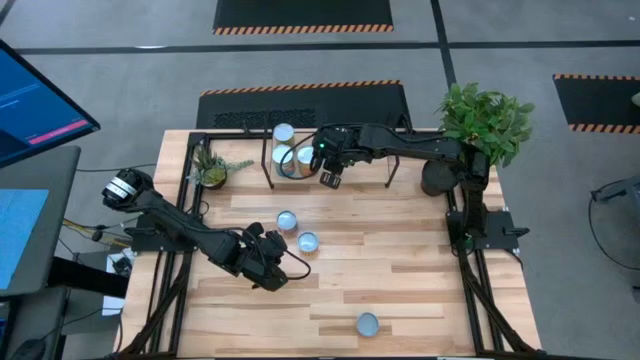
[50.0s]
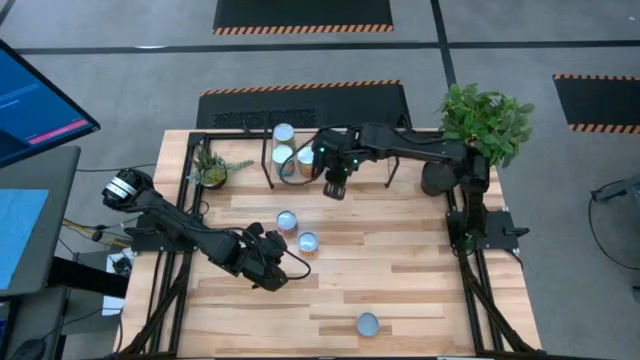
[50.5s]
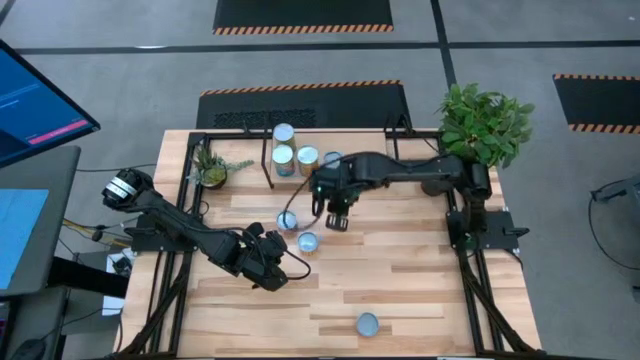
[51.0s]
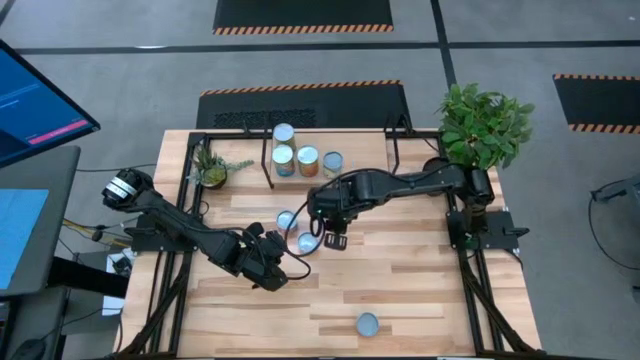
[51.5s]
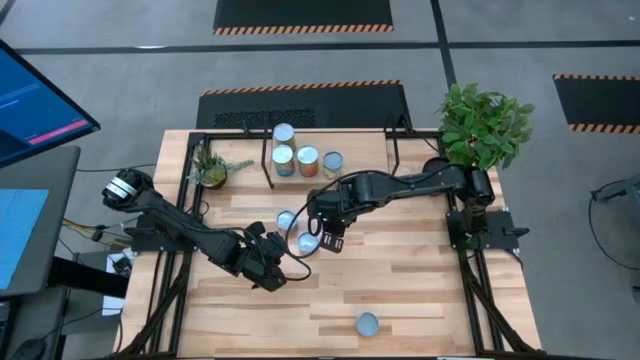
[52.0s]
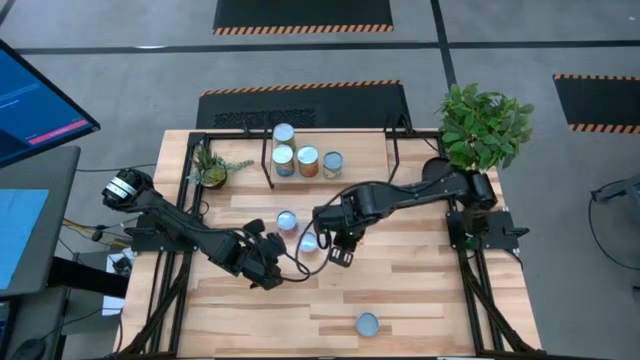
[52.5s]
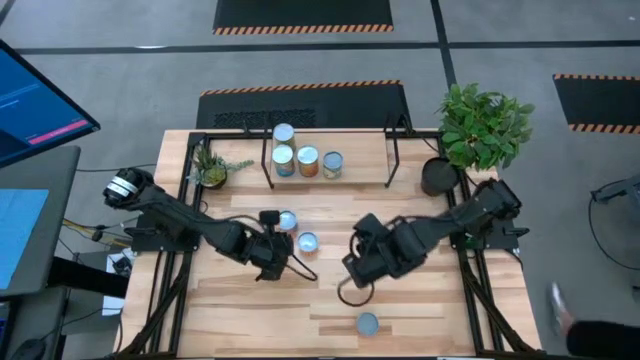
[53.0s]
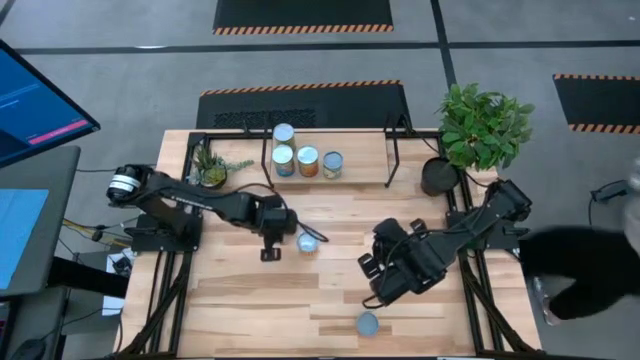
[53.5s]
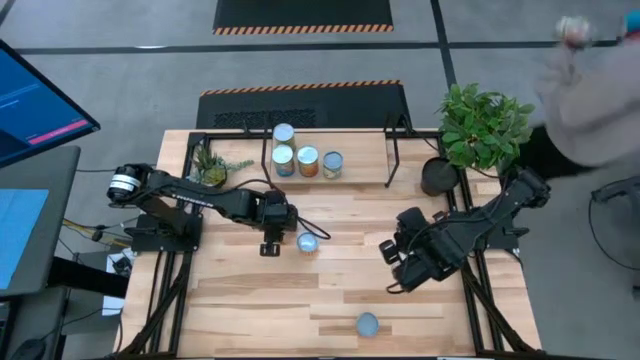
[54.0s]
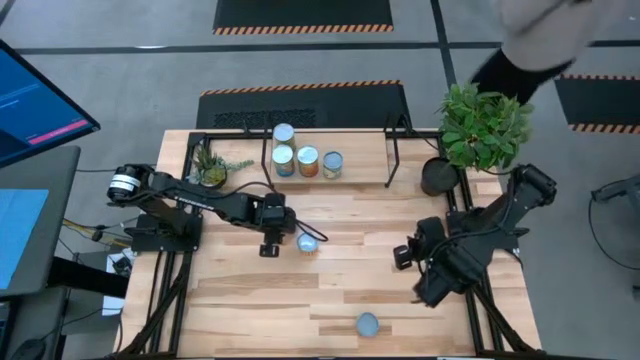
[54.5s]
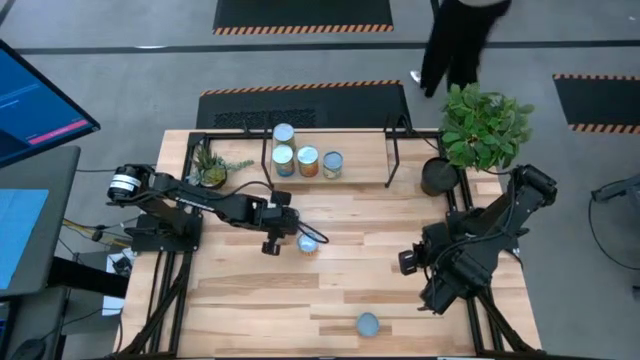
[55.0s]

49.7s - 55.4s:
Task: Pick and place cans onto a shelf
Put the canned corn on the shelf

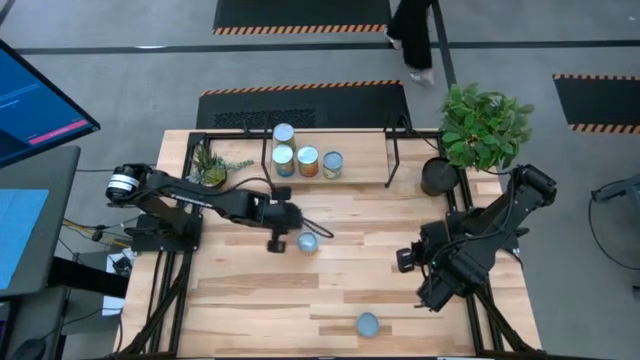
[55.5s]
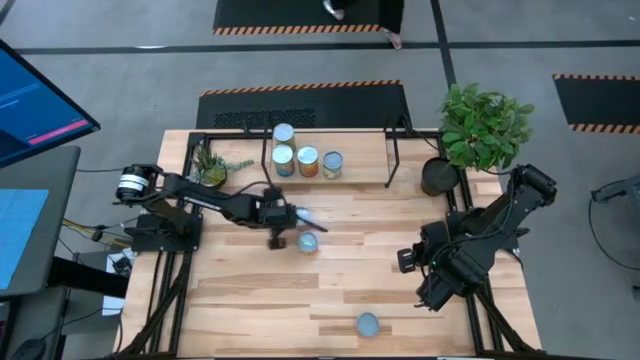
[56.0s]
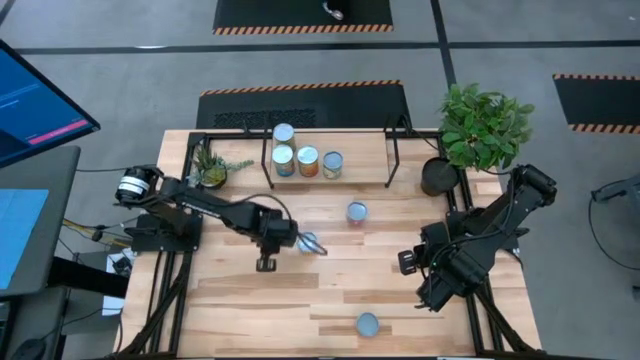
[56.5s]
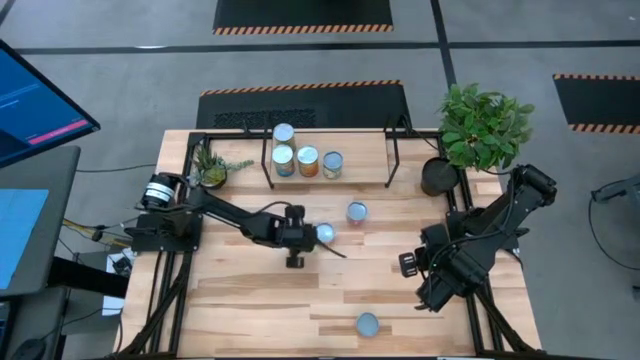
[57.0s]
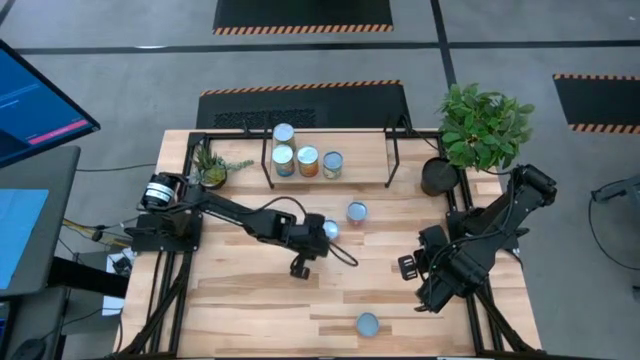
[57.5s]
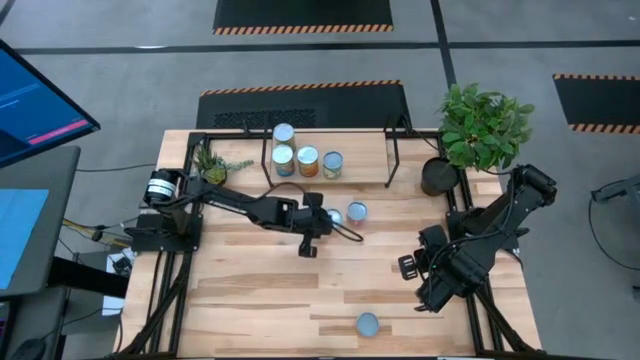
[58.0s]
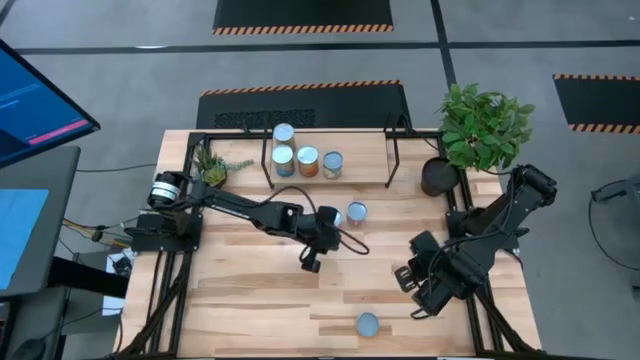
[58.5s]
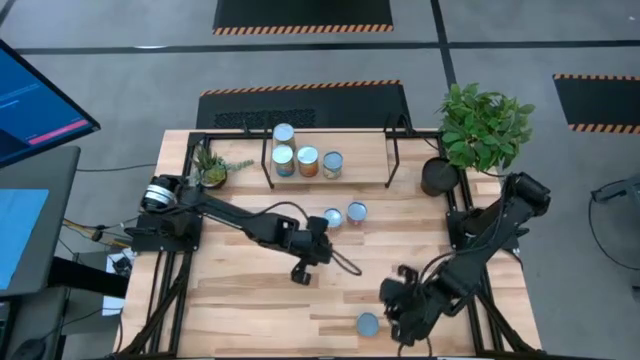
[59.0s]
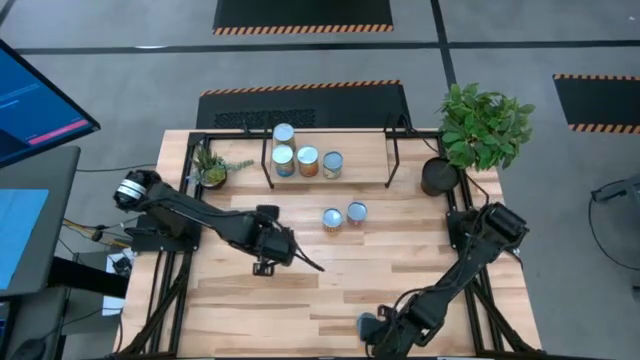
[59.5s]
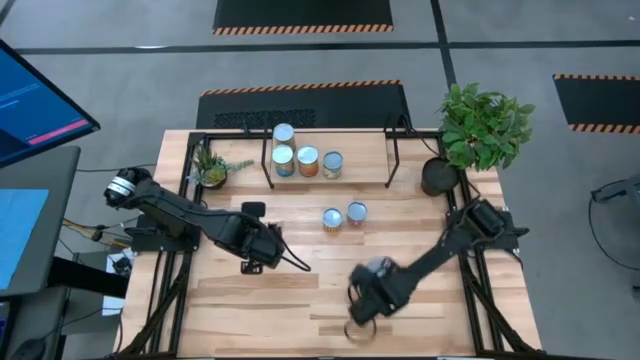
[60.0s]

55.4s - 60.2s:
Adjust the canned goods

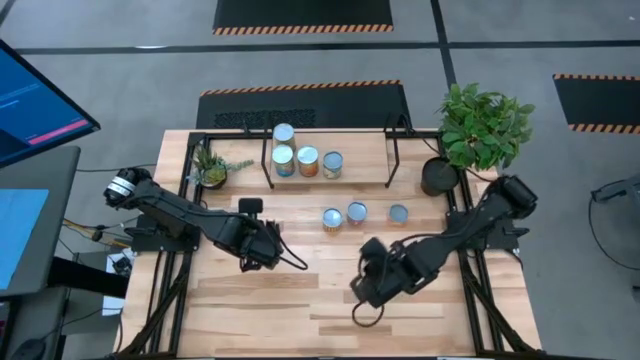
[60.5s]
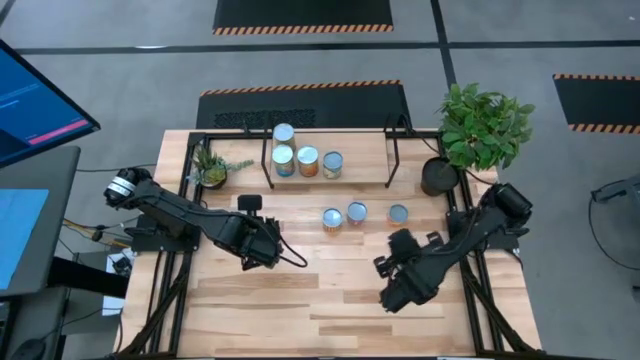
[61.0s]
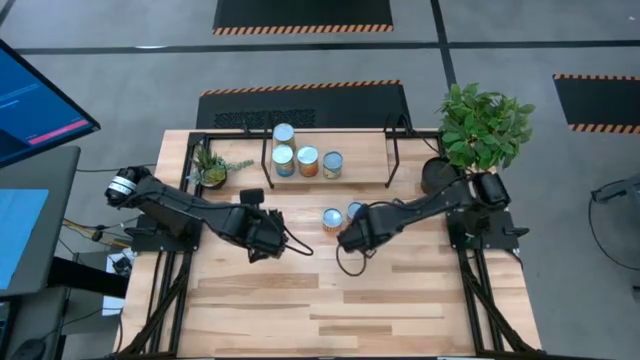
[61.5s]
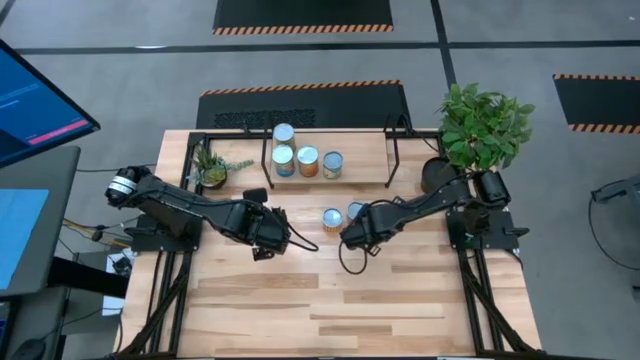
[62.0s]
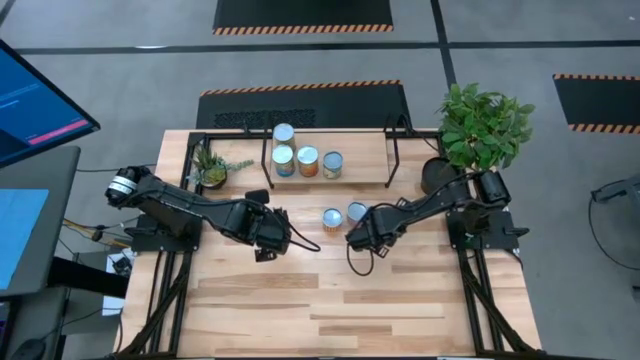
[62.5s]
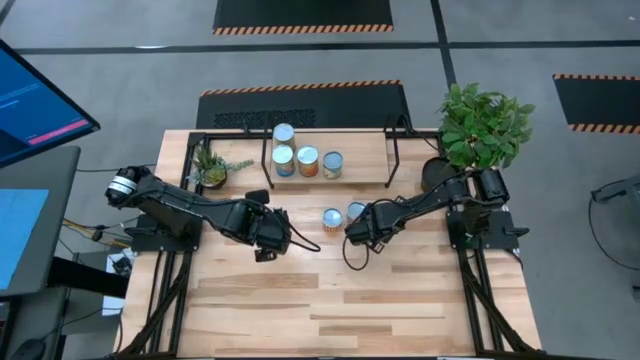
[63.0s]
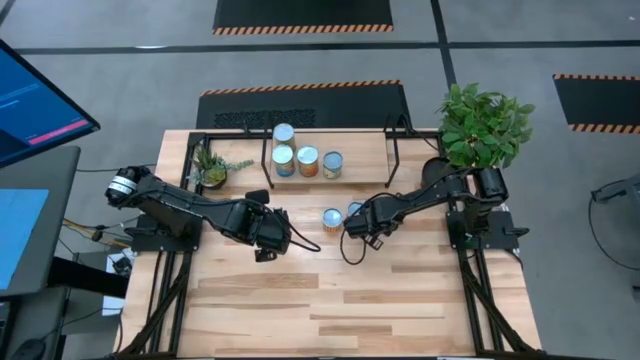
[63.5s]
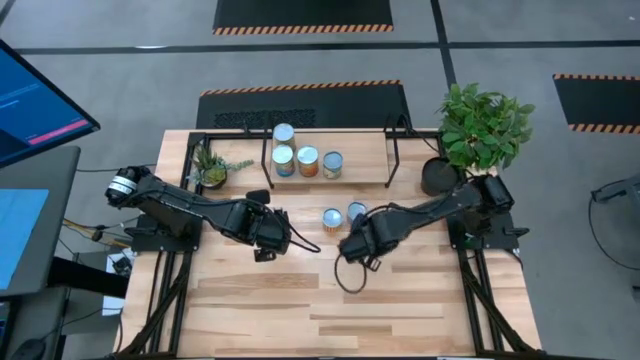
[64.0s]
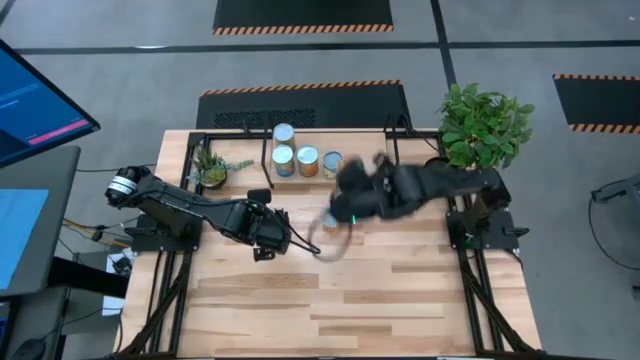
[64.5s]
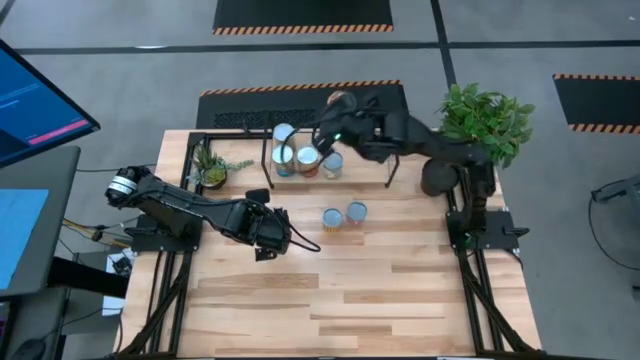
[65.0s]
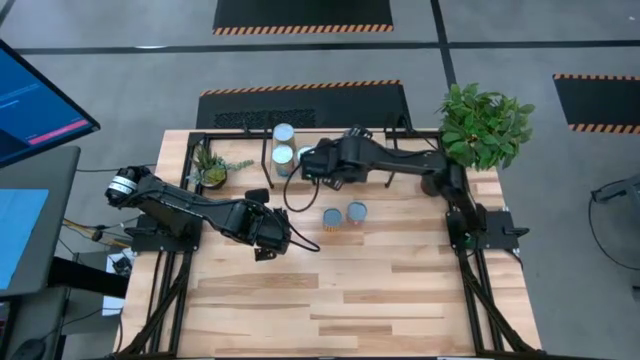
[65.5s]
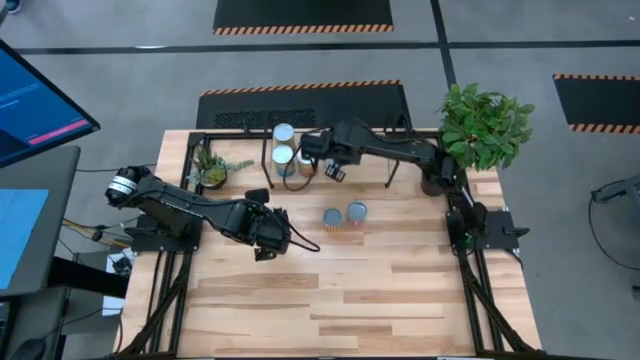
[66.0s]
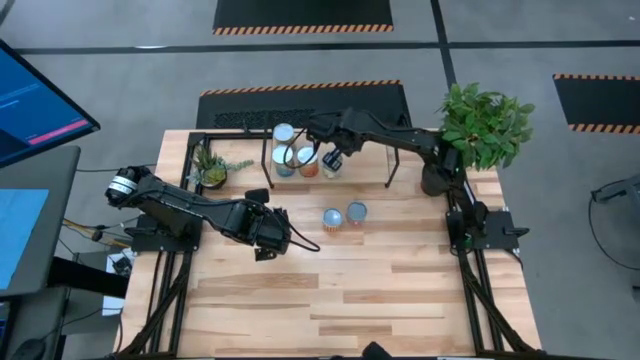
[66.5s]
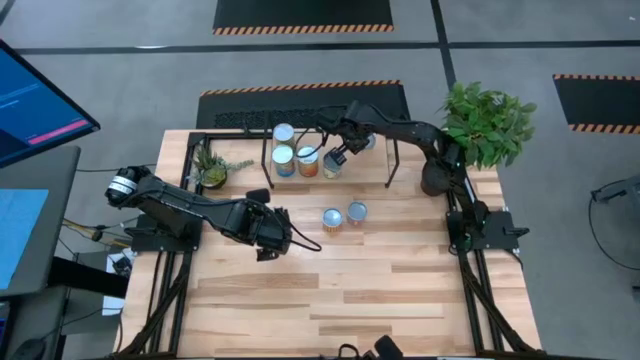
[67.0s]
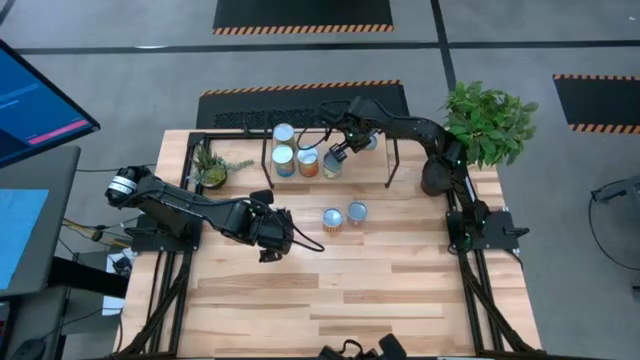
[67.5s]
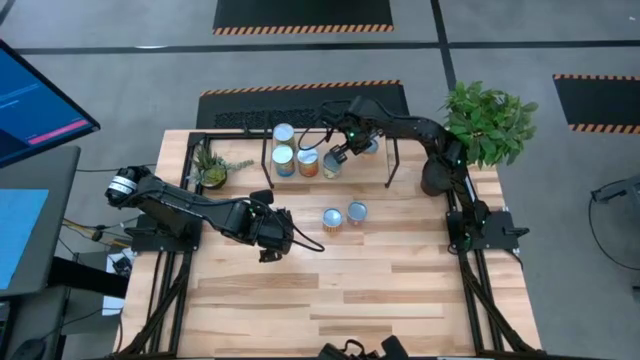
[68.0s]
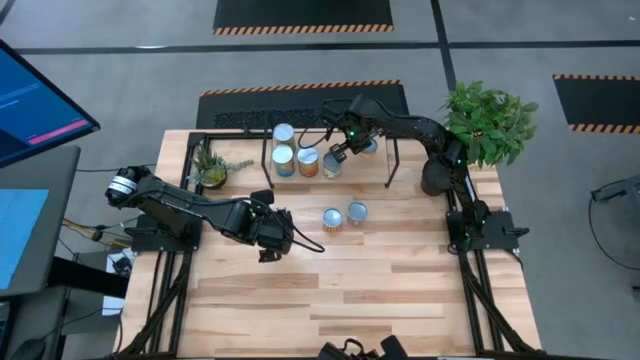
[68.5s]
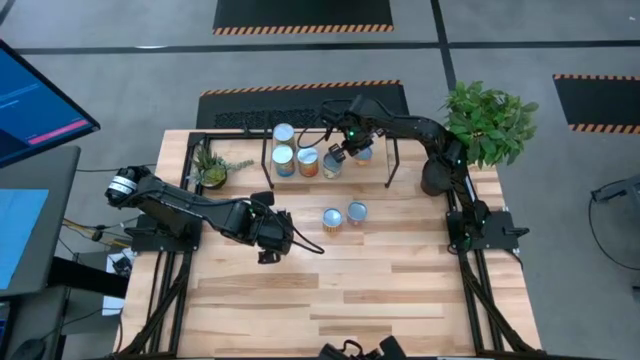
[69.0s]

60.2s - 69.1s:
Put the canned pineapple on the shelf

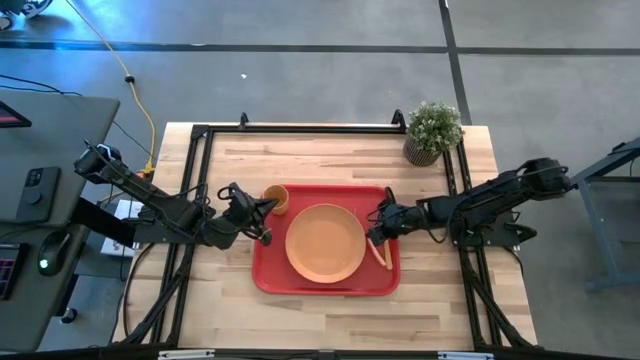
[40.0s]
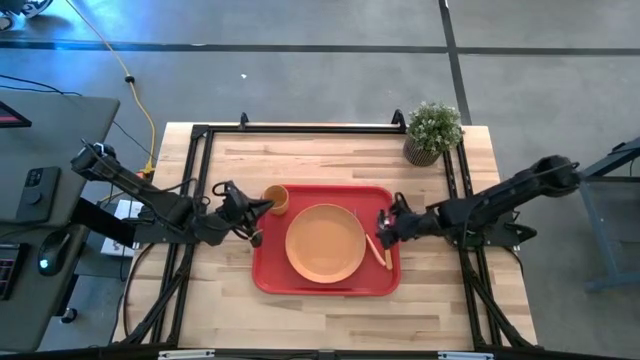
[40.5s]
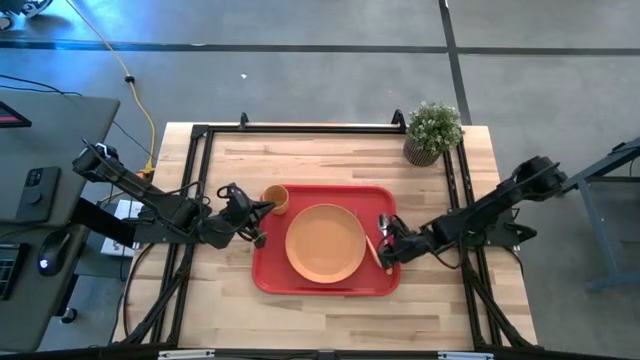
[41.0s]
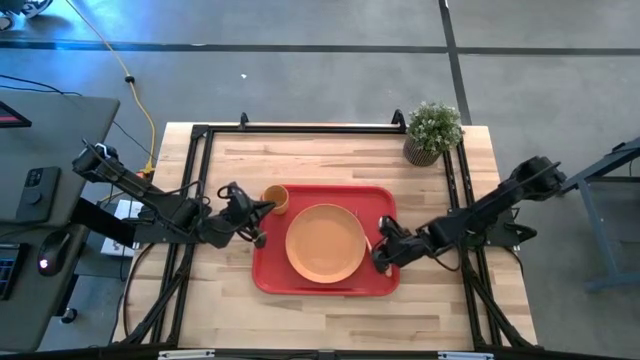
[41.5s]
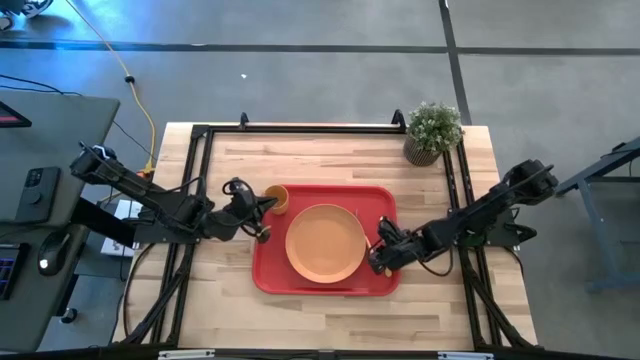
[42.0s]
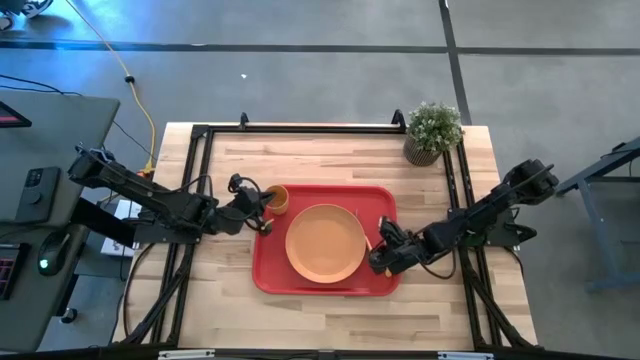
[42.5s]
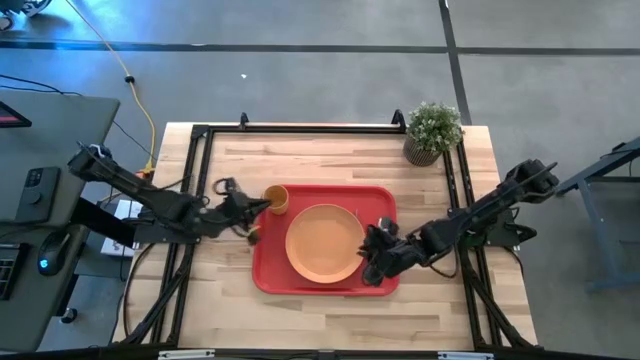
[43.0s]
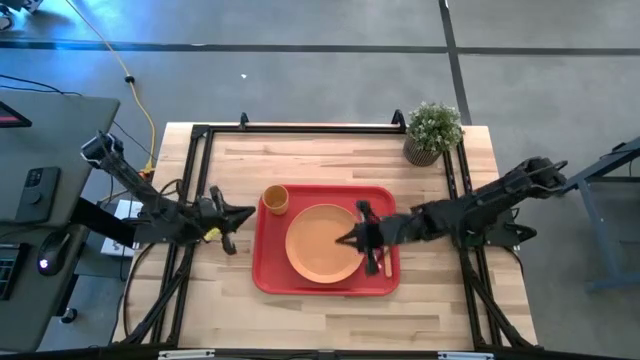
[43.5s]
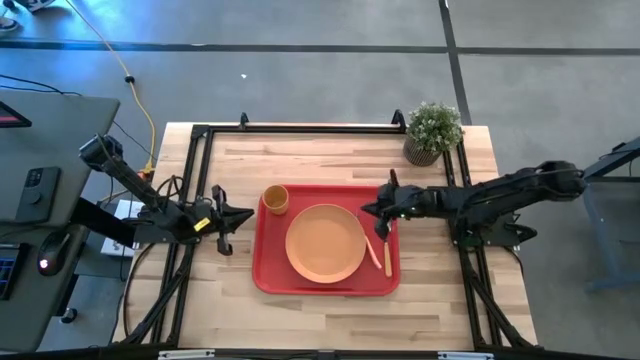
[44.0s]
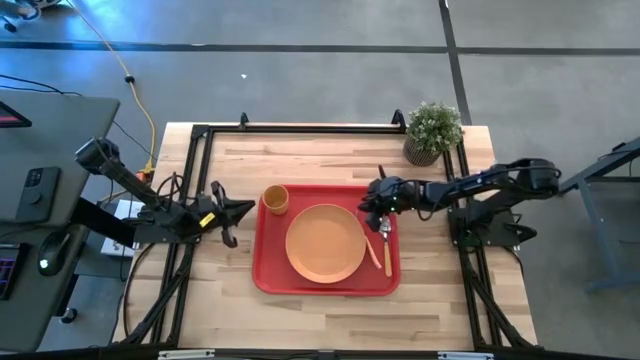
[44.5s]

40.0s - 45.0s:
Task: Pick and place plate/cup/fork/spoon on tray
Adjust the orange fork
